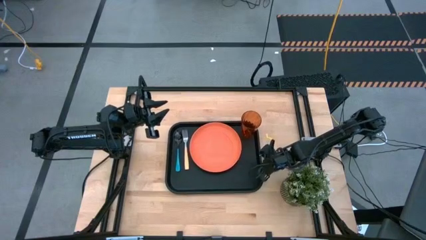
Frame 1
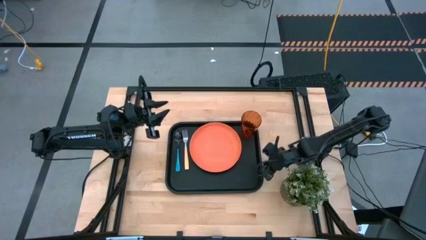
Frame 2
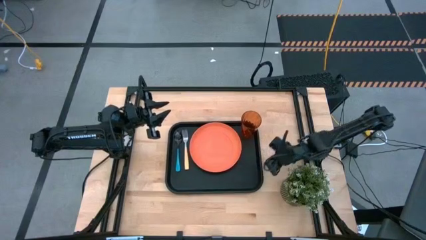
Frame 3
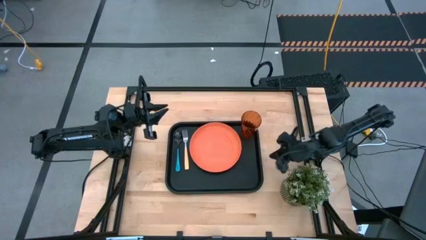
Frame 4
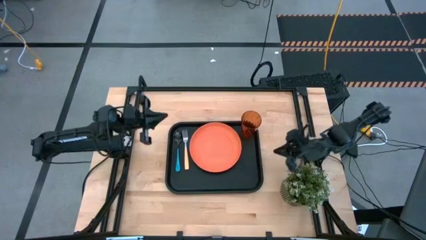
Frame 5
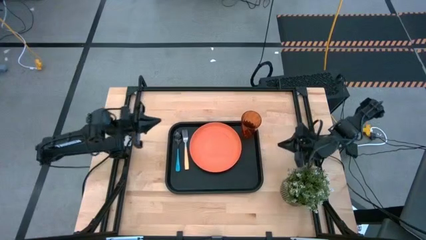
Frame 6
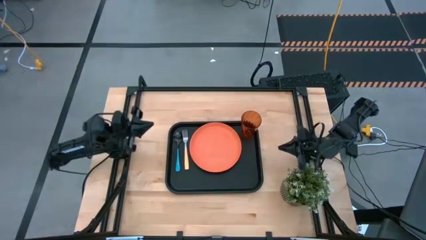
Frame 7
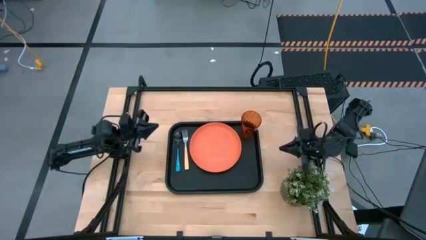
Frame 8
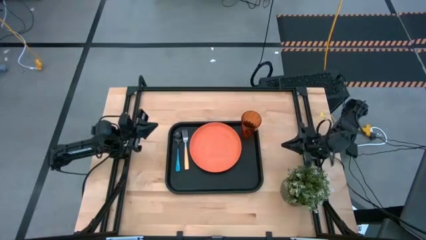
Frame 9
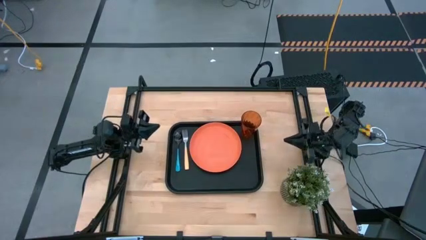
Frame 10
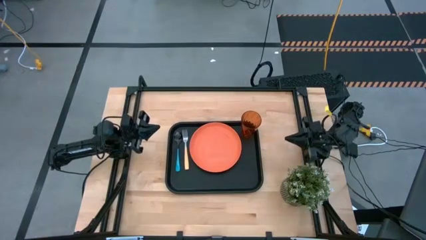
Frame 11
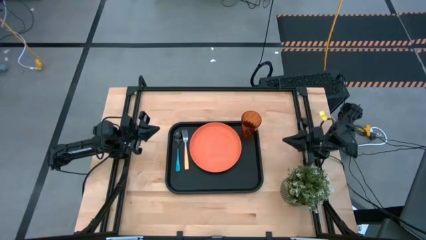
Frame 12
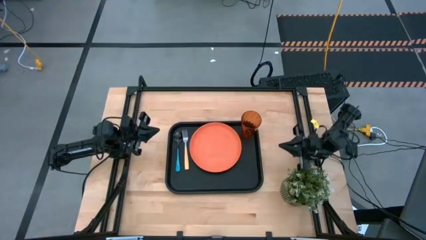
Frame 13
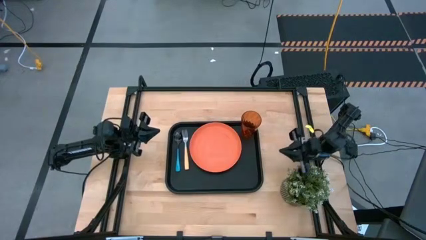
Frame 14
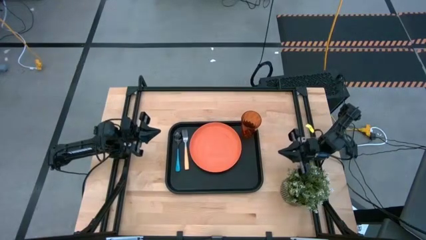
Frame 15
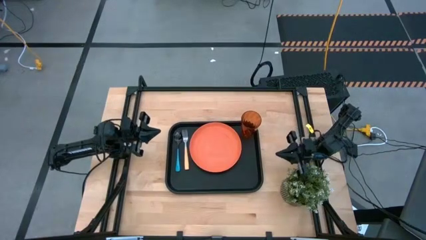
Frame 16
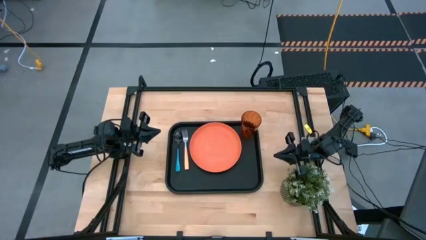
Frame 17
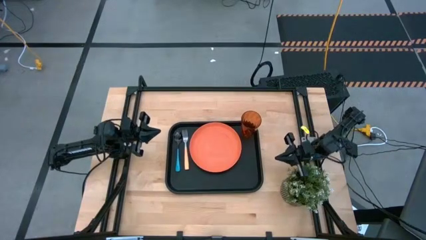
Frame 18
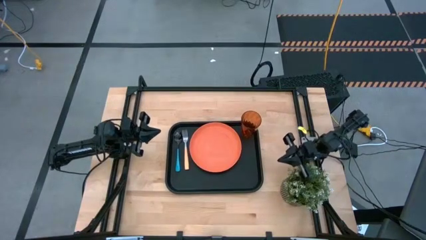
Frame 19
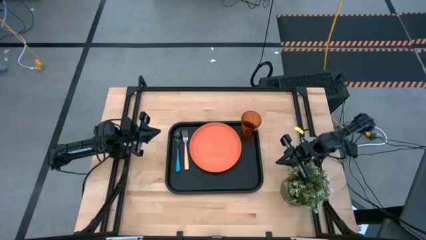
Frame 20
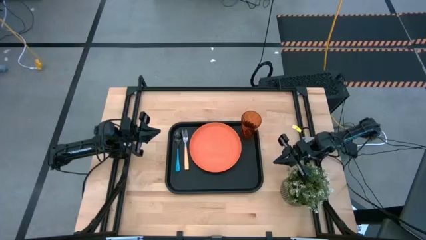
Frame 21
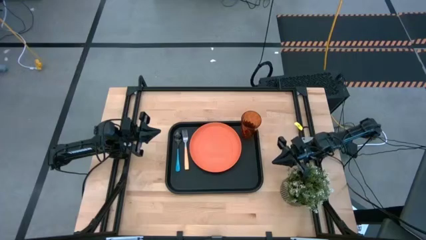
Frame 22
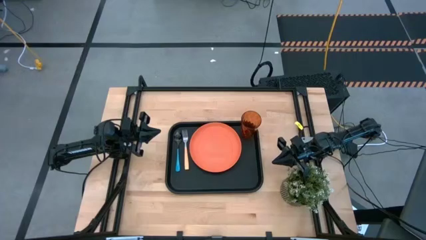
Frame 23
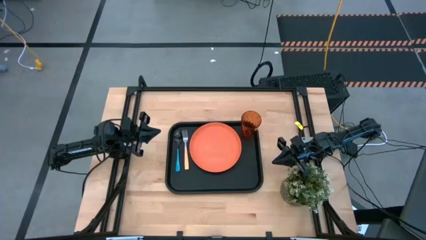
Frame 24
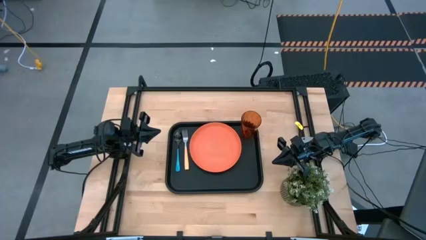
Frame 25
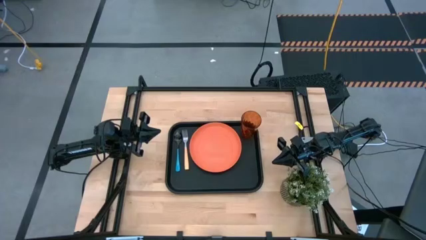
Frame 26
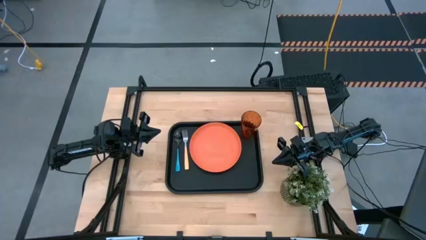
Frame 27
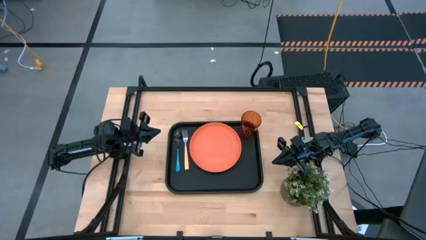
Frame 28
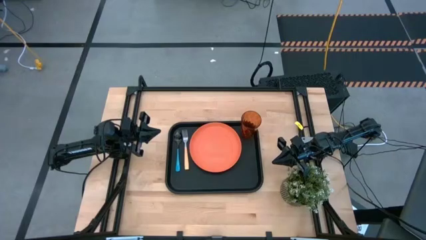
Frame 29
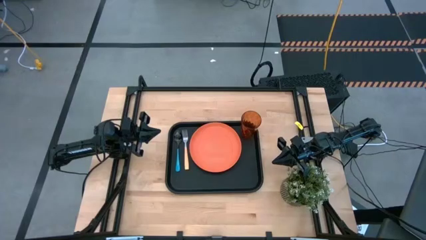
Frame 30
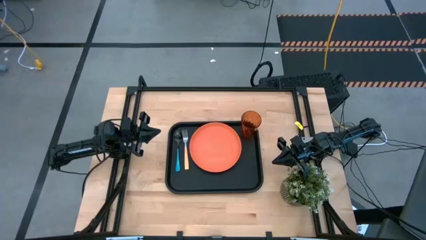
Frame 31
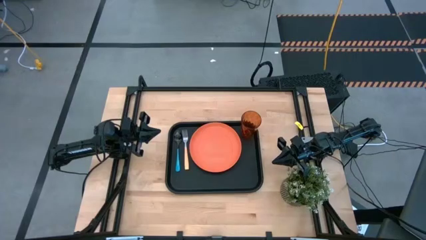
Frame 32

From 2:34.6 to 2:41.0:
Task: Pick and place plate/cup/fork/spoon on tray
Return to Home Position

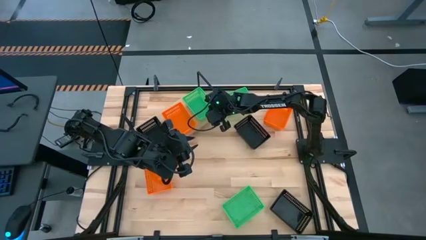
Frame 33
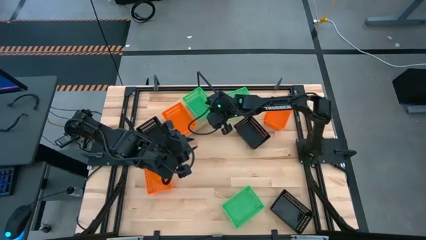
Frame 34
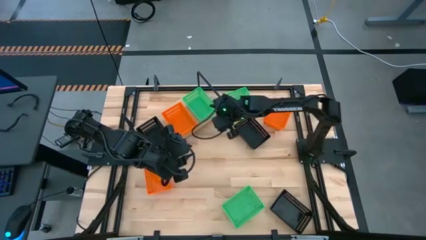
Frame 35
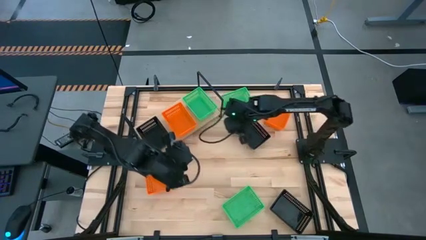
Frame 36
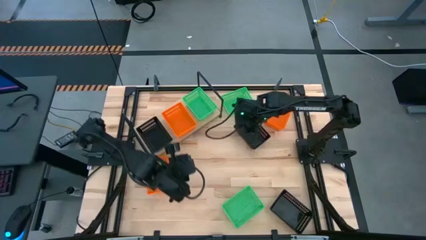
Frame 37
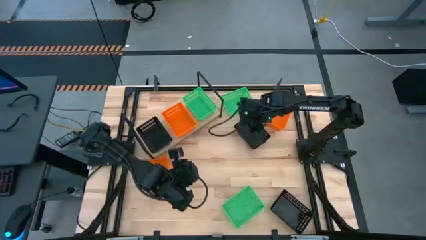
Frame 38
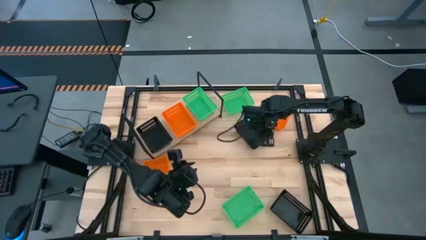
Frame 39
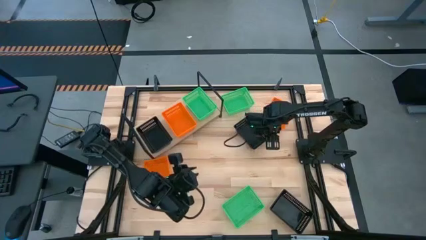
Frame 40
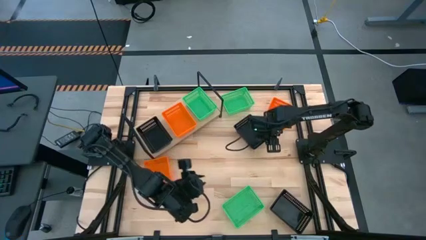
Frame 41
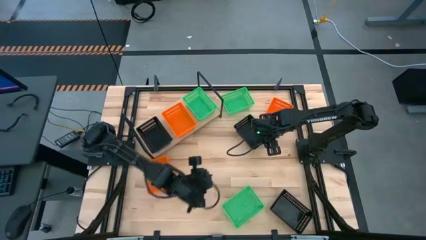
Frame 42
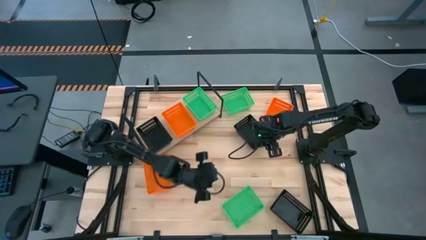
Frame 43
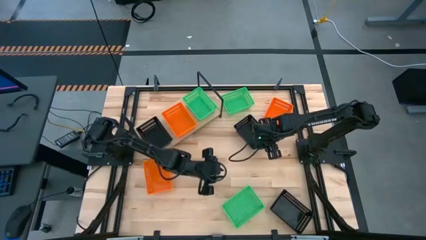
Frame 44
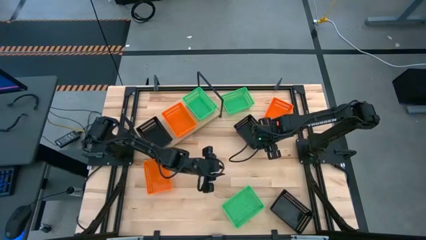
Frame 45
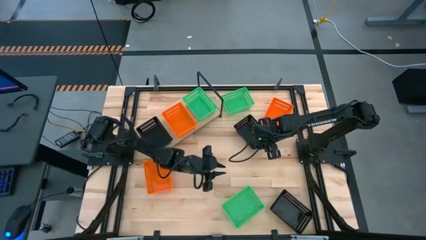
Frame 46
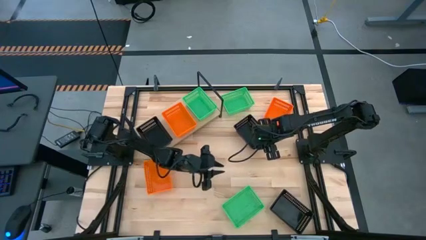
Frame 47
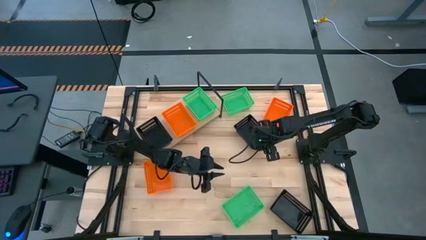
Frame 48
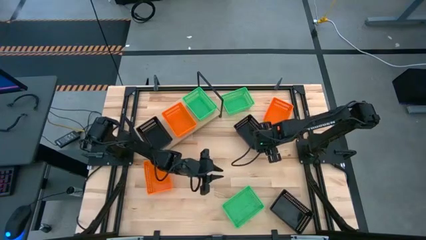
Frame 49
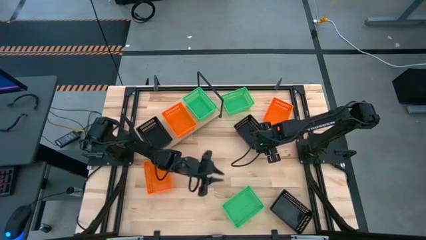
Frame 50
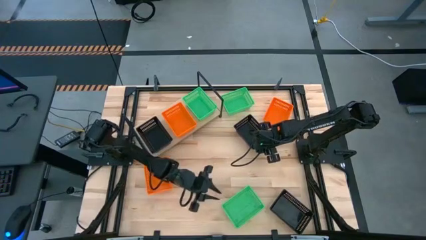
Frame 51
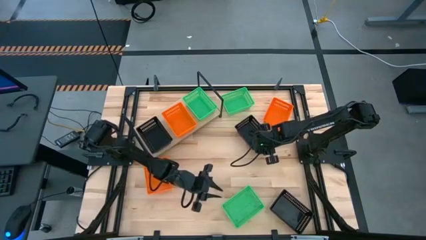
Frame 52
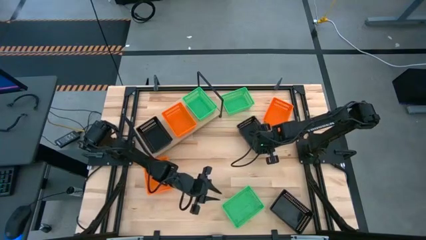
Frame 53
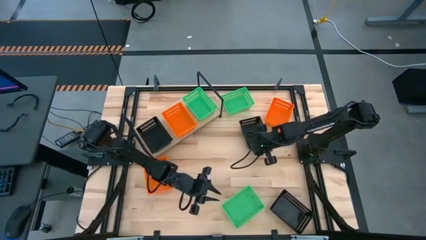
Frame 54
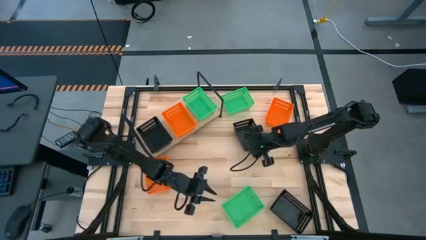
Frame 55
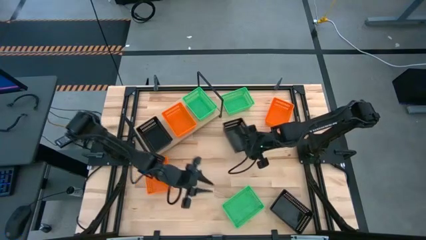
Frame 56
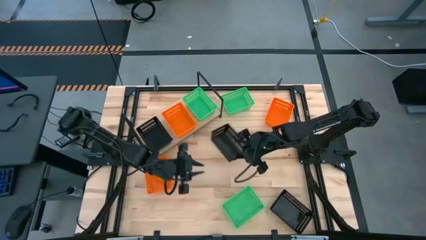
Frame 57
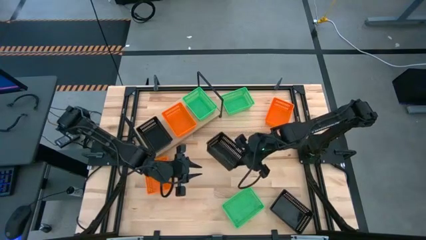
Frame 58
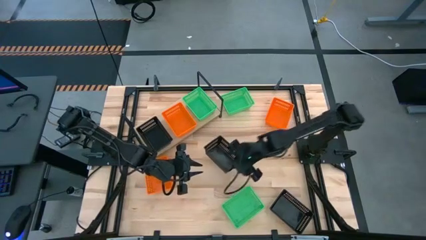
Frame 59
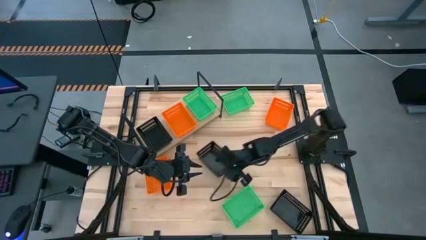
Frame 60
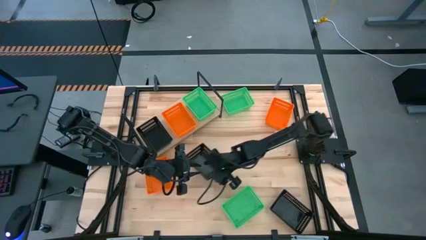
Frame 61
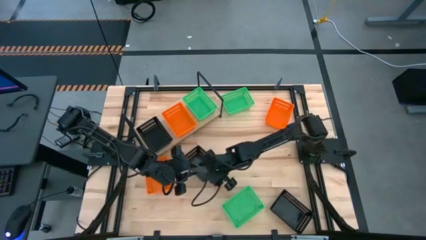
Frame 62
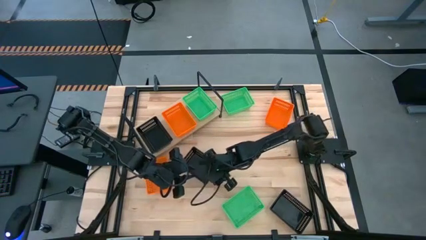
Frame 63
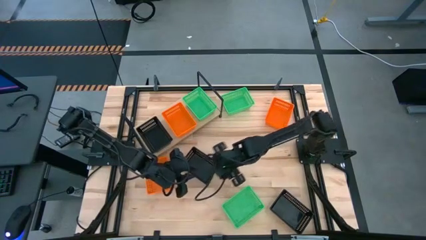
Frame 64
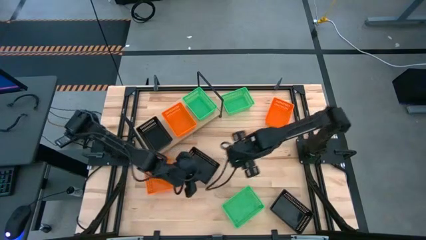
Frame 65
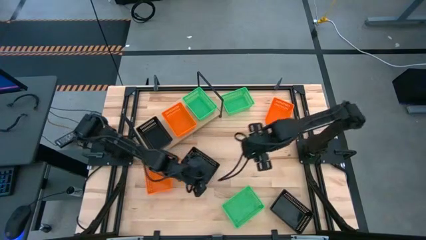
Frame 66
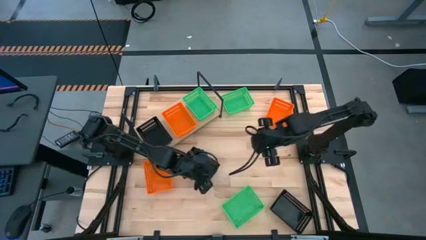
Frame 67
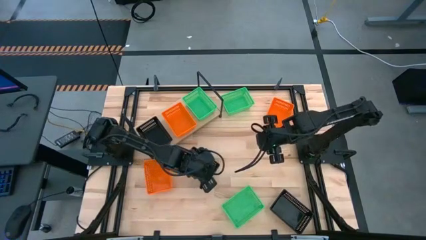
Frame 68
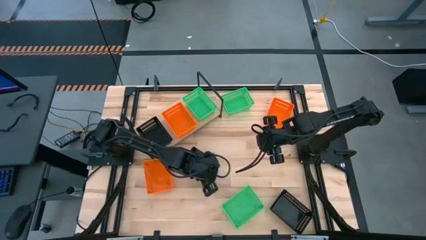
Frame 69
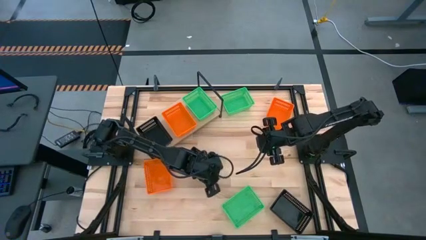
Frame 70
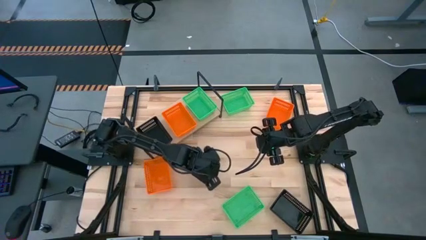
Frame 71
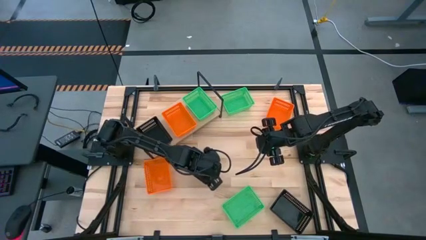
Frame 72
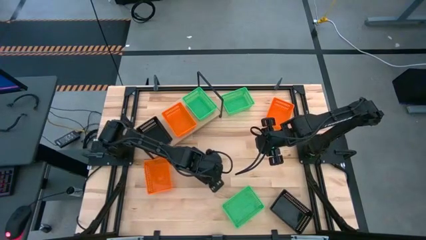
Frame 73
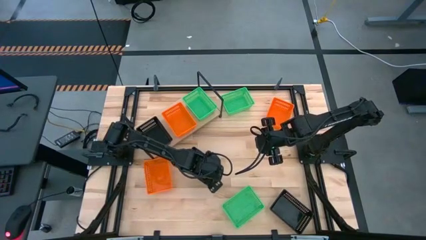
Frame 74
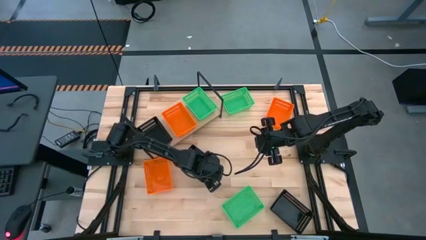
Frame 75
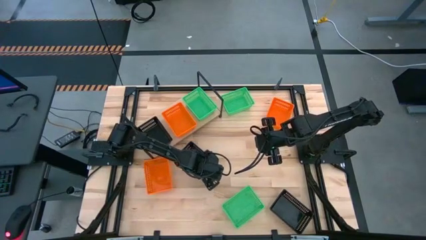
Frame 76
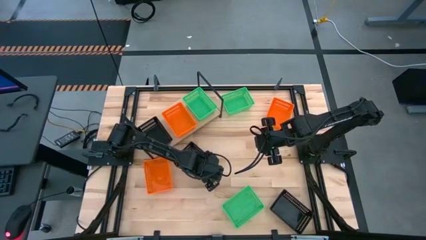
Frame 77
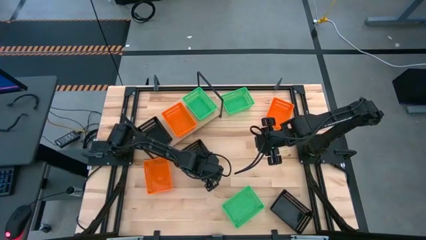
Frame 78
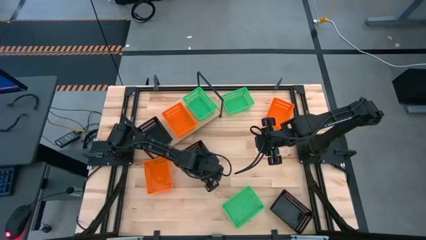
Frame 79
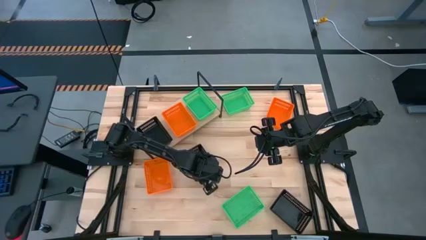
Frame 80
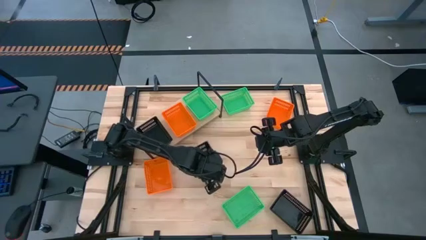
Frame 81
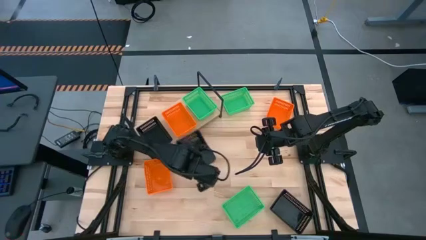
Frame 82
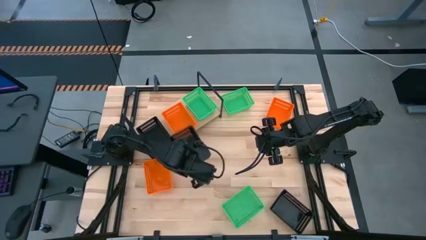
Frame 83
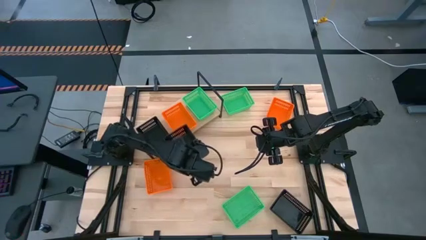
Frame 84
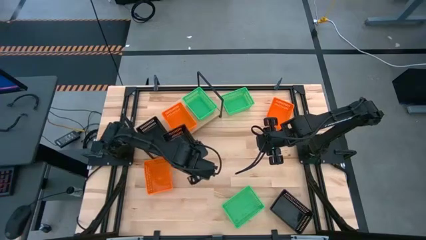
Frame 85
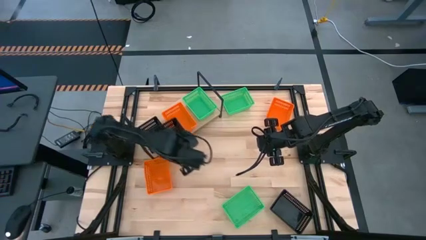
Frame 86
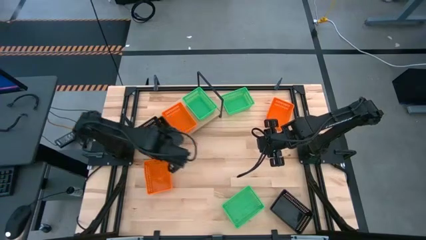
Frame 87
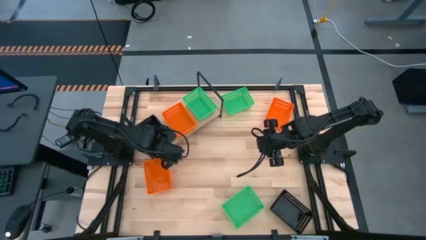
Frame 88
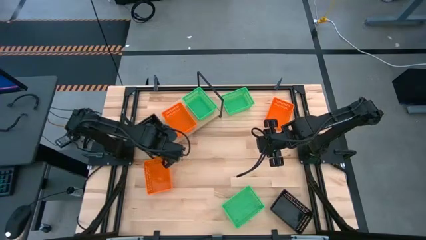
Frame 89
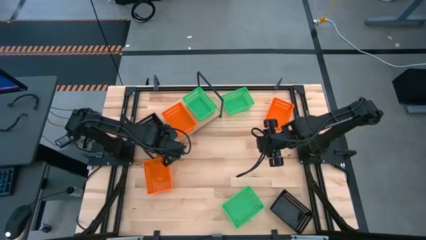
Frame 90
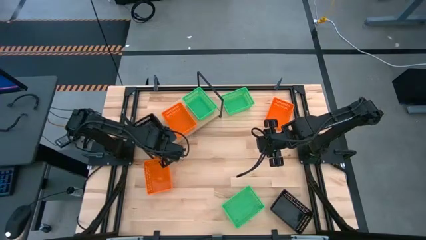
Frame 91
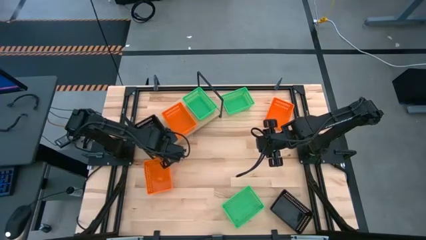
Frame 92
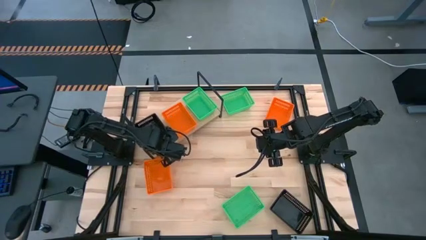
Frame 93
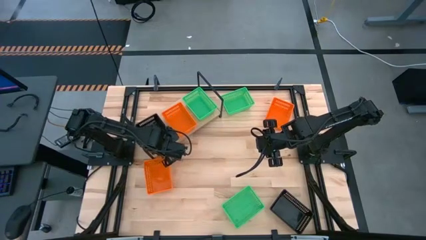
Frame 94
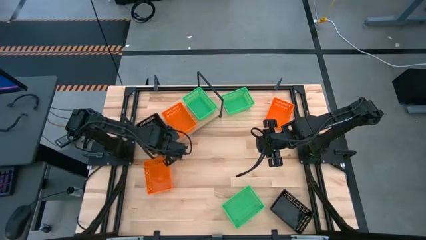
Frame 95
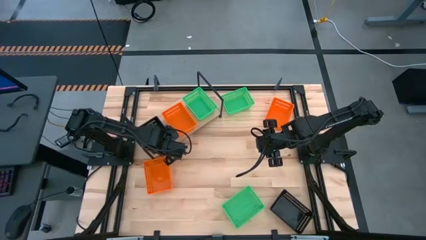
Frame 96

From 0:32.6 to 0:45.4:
Task: Stack baskets on shelf by color
Stack the top black bin on top of the black bin on the shelf
